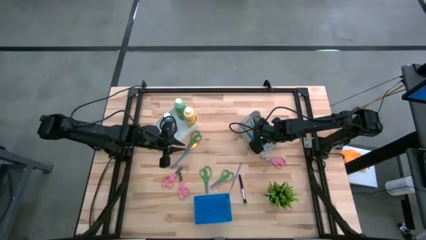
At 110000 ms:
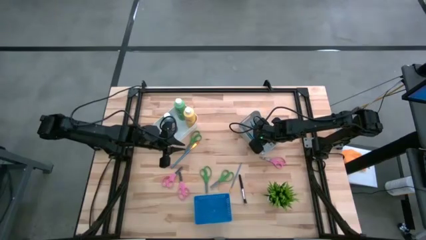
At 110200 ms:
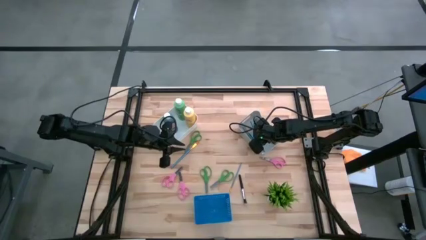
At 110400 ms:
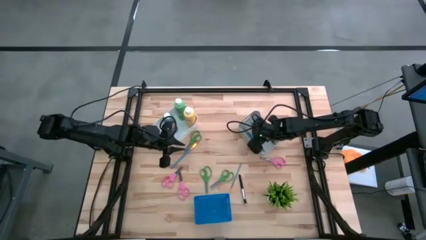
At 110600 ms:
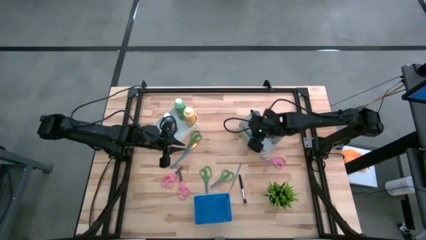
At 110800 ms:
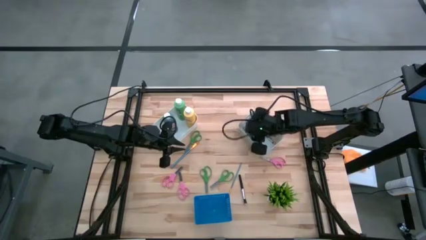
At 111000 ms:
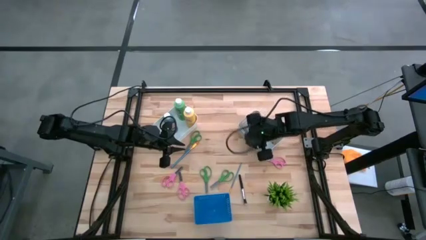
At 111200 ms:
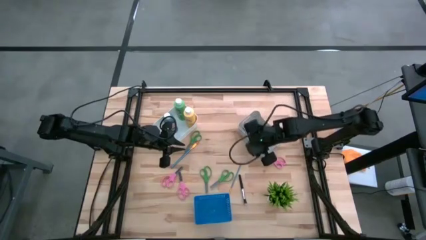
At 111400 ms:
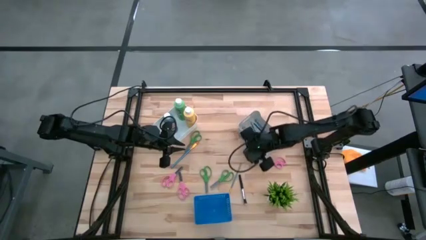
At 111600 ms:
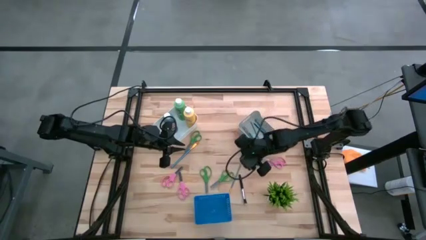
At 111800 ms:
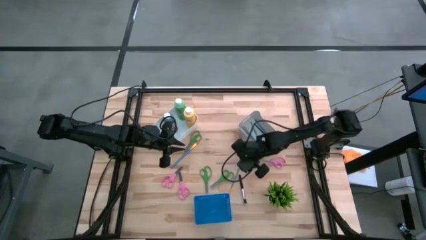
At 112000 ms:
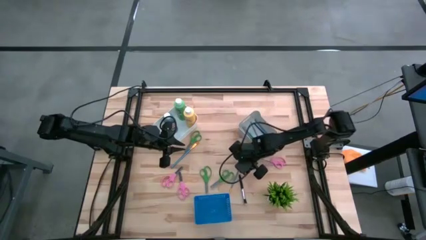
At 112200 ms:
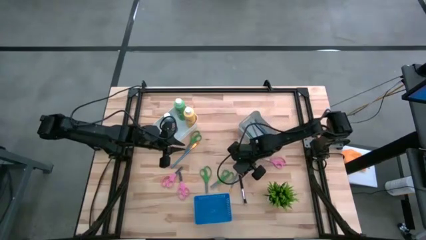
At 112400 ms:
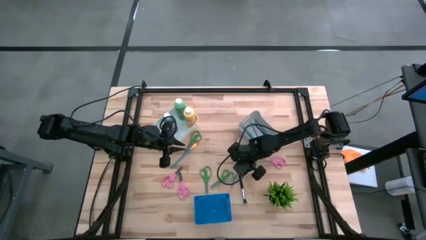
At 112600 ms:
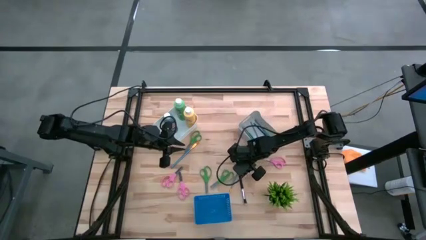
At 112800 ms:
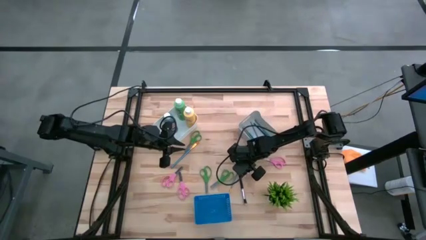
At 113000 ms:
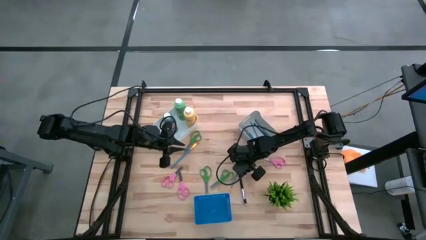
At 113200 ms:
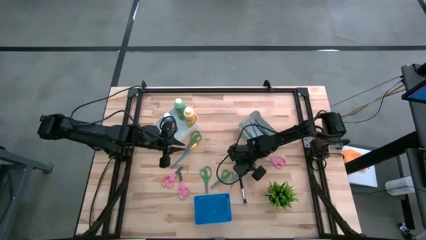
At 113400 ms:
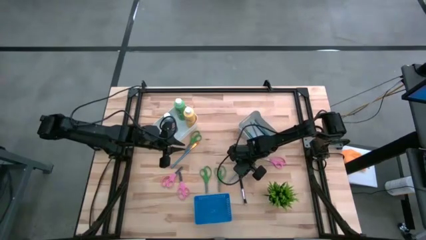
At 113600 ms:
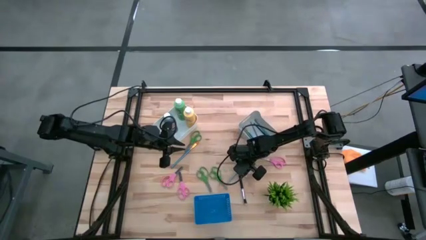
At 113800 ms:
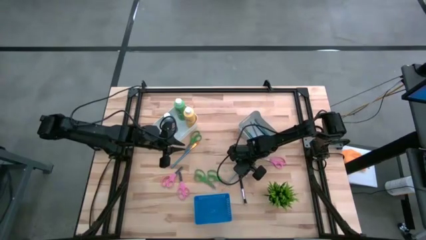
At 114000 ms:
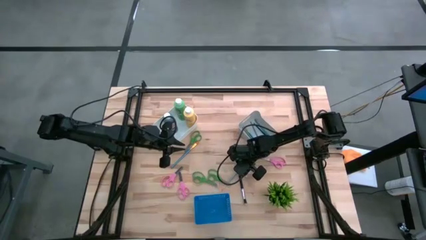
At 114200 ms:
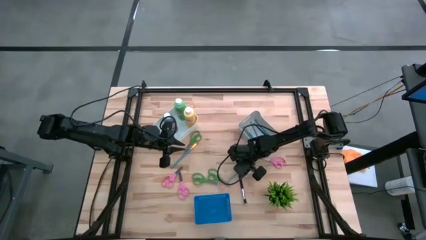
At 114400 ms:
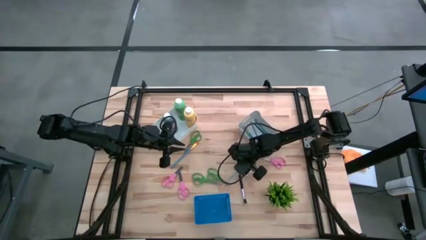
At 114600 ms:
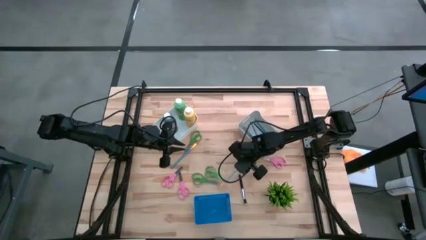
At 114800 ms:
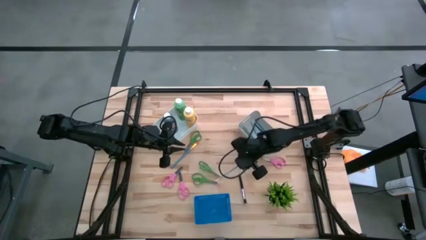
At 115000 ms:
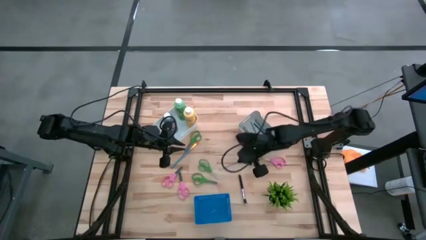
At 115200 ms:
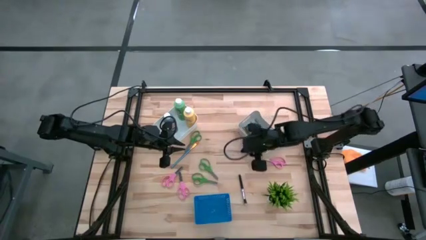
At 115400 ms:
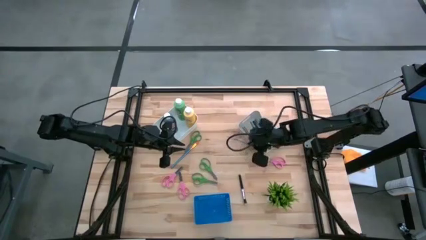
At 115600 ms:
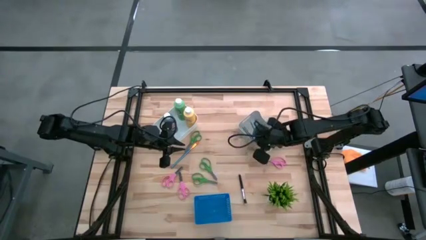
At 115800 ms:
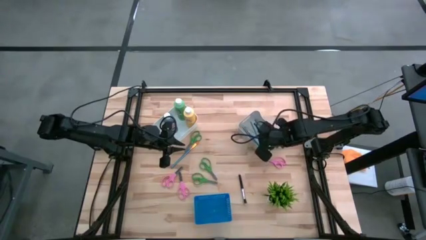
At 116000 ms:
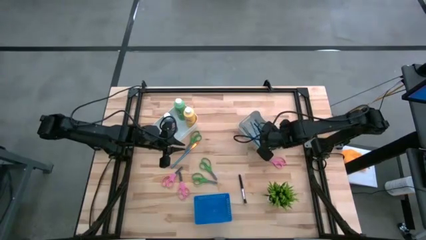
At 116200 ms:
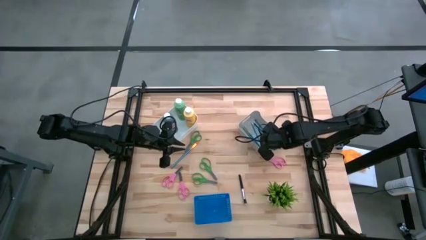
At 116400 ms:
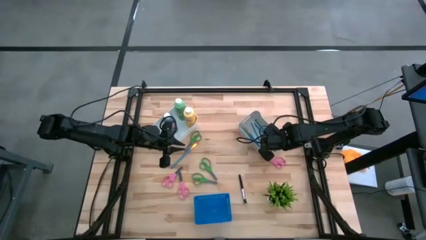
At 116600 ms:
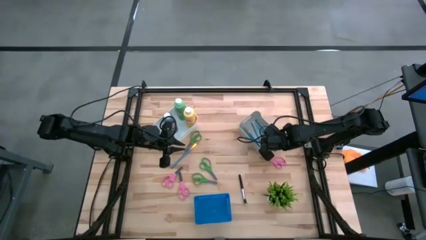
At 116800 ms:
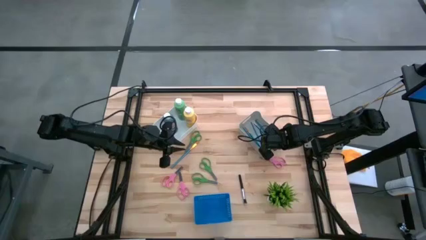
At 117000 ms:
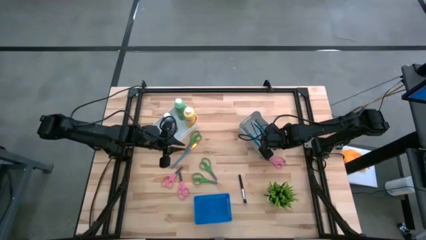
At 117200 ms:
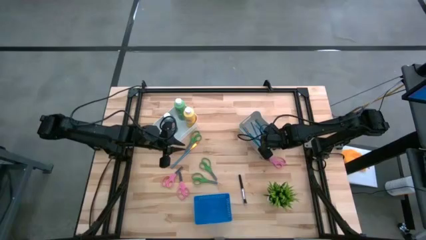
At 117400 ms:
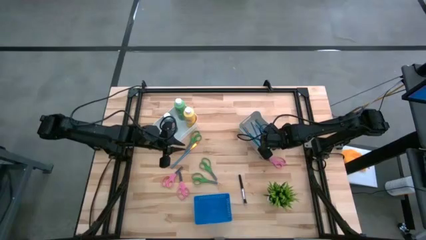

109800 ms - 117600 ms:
Task: Pick & Place Paint Supplies
Put the blue paintbrush into the gray bin

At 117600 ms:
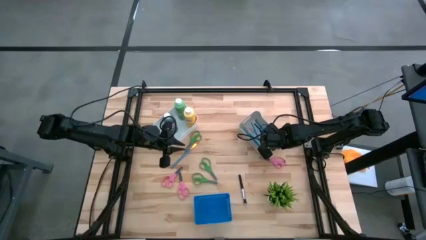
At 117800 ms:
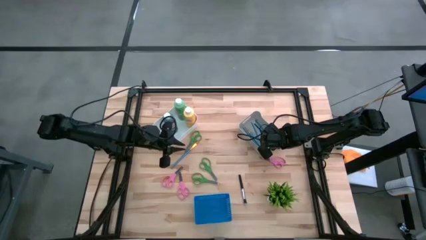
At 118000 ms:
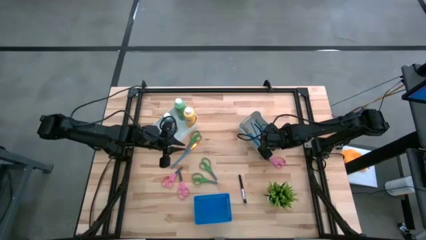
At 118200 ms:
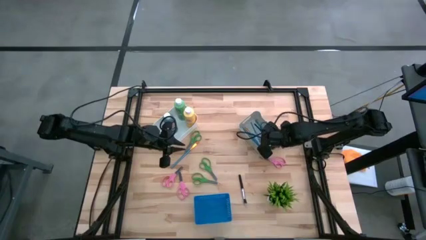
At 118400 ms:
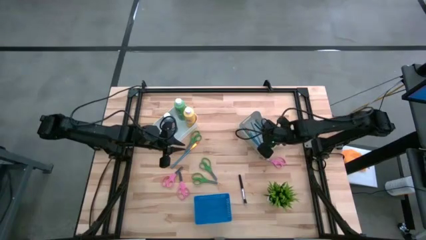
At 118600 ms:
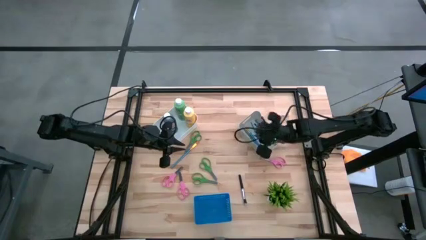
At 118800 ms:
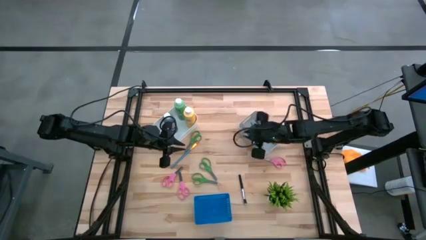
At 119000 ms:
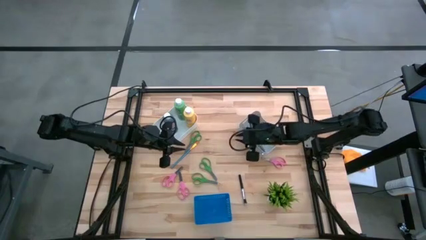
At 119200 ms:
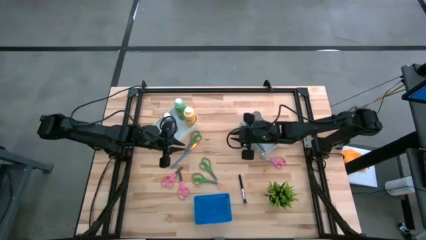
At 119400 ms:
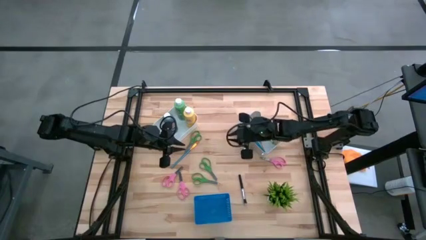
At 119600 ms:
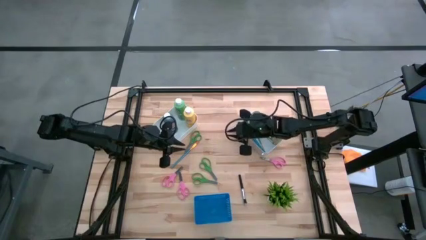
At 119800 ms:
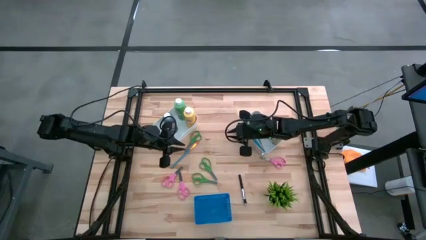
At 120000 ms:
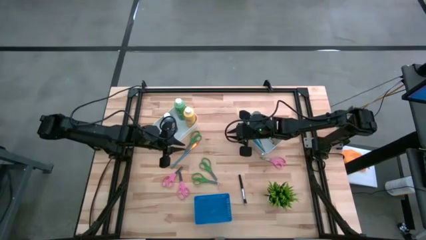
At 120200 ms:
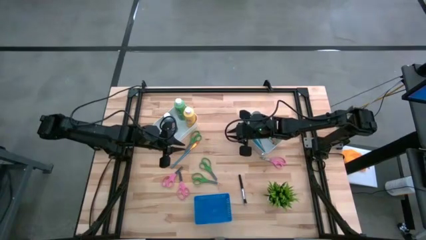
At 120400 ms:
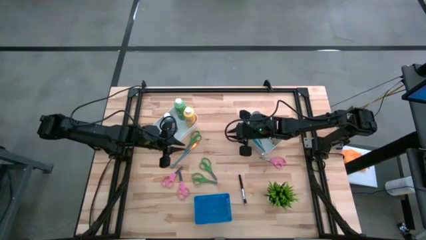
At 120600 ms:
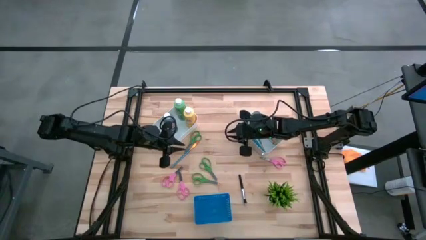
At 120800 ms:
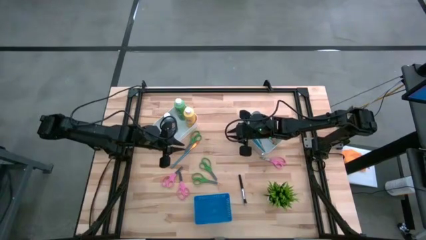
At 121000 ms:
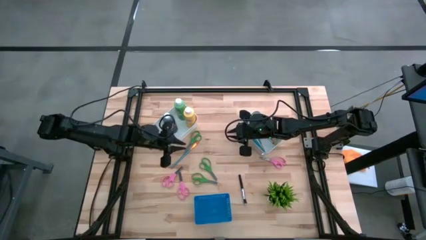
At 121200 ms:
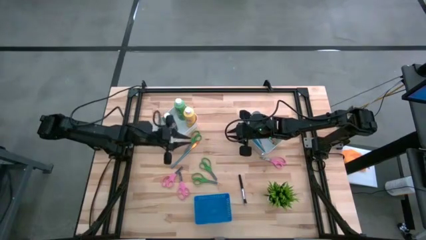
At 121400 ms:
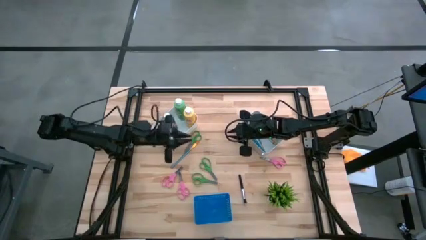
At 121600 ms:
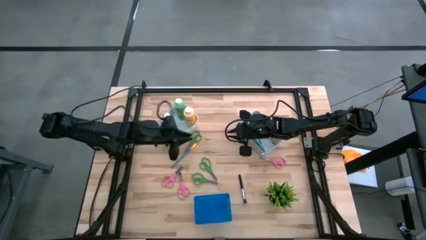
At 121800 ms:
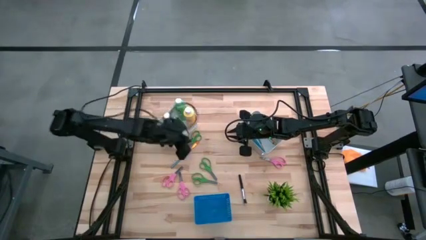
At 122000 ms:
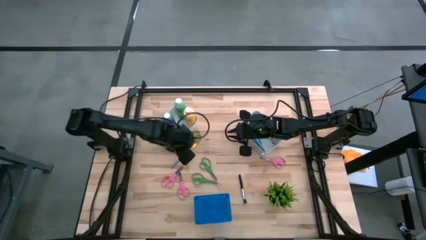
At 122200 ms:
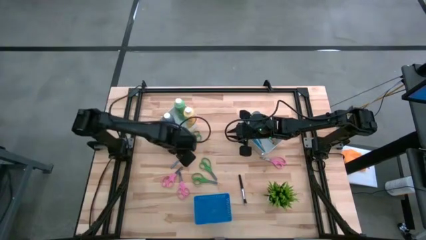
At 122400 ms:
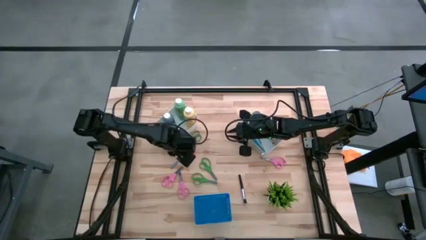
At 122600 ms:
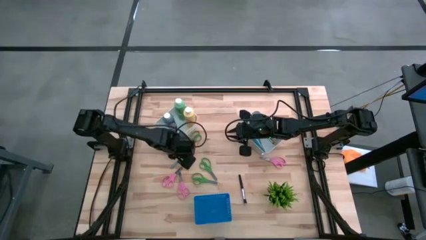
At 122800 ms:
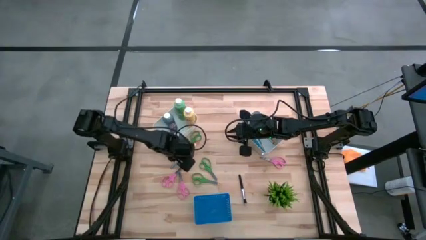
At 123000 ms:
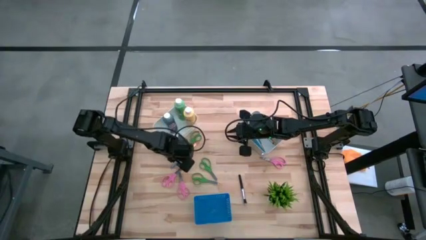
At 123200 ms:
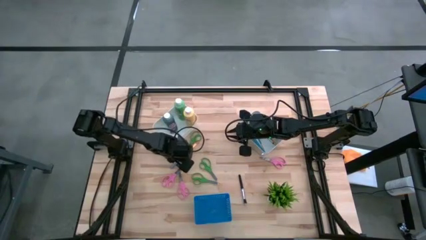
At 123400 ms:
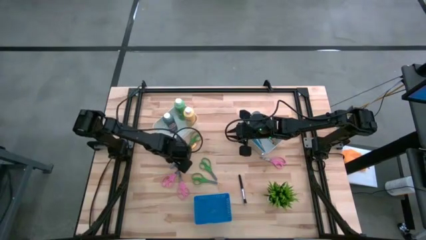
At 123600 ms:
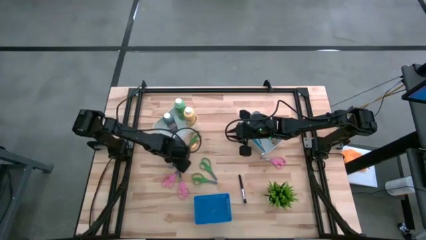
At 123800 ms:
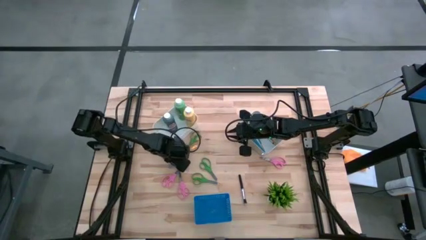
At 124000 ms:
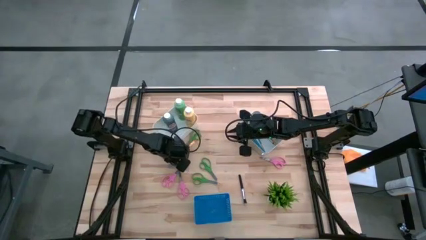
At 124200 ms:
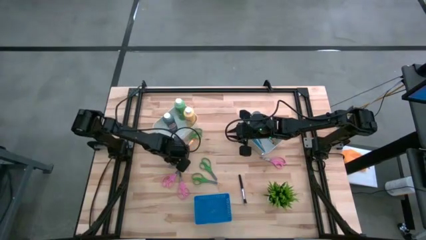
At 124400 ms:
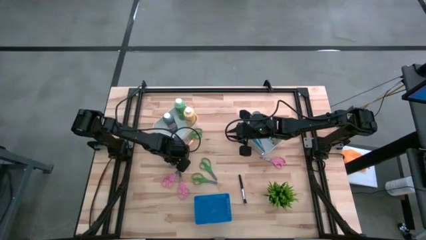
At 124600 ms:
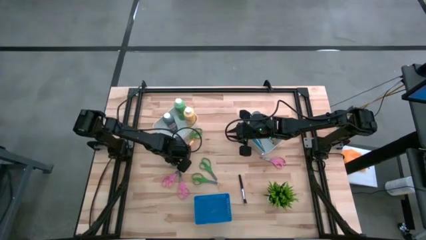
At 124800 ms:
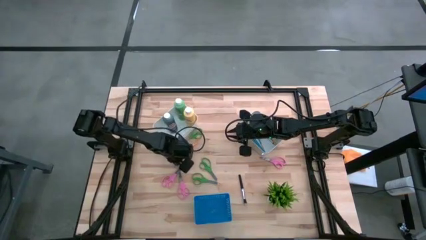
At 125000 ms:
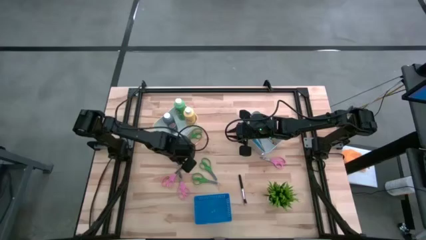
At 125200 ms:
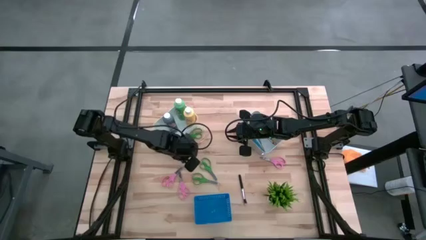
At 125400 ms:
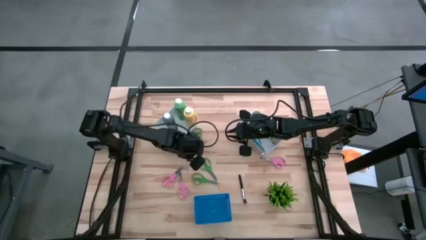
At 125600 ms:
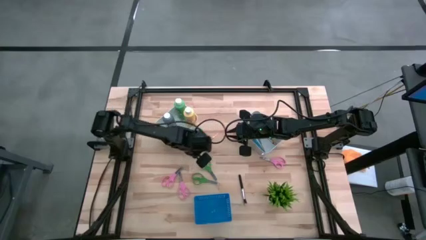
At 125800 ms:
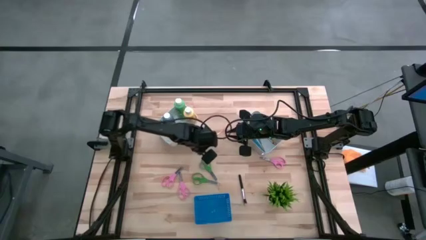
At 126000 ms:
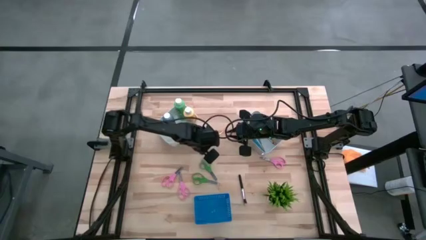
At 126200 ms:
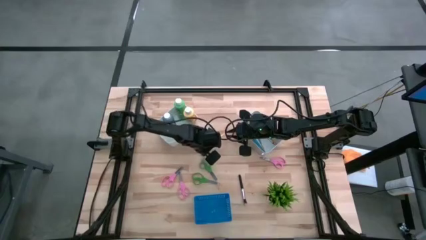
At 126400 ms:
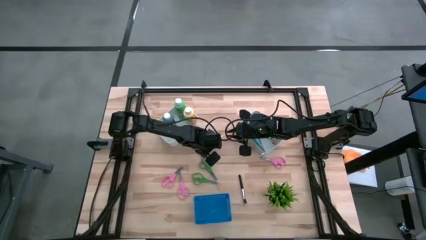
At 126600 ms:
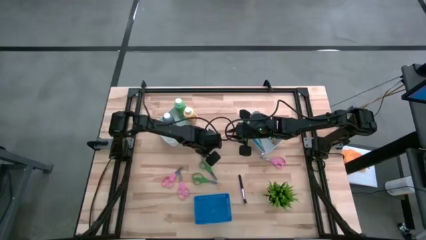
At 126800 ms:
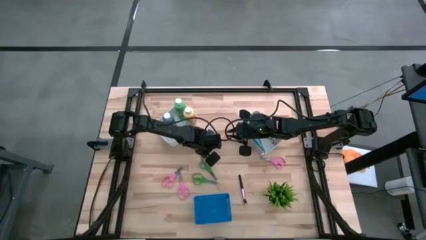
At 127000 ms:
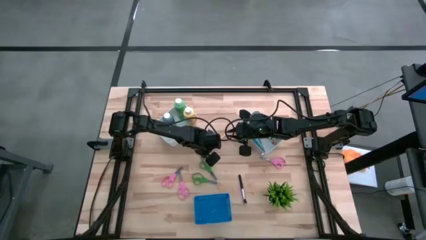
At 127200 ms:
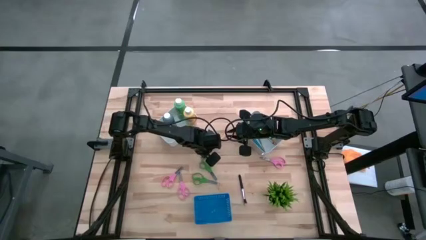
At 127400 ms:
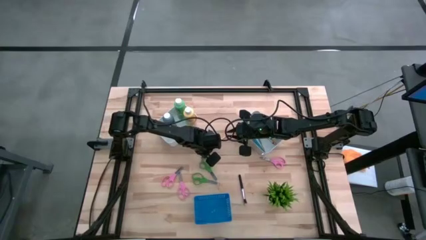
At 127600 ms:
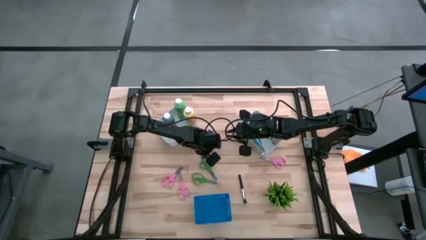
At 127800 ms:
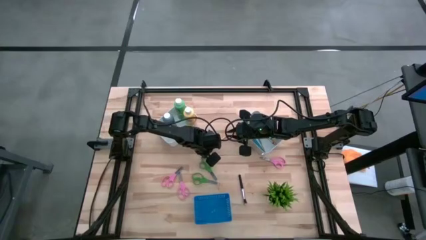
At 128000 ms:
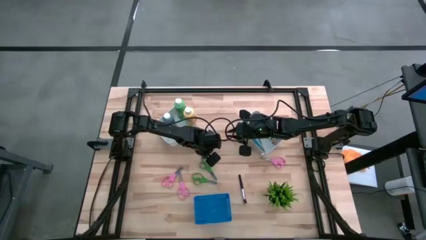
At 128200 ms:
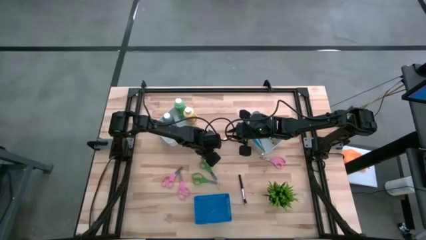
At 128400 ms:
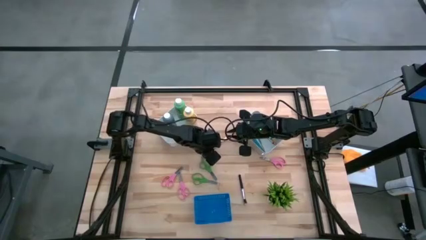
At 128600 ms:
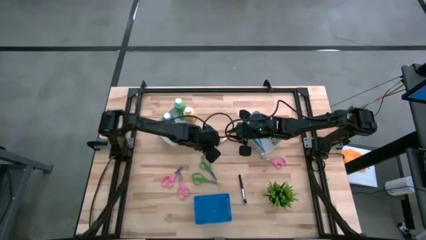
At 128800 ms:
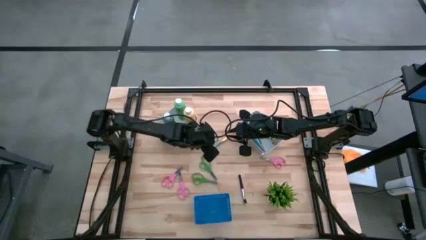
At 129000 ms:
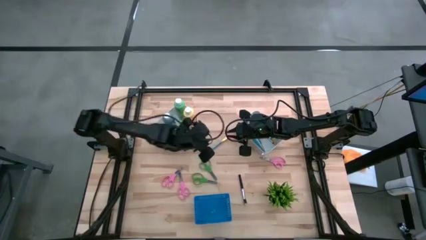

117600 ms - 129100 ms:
Put the blue paintbrush into the gray bin
